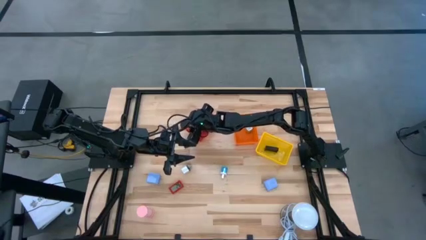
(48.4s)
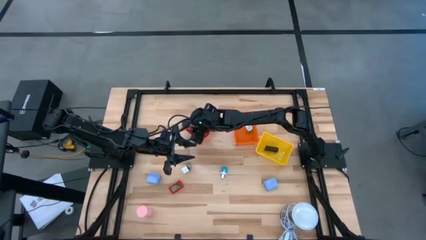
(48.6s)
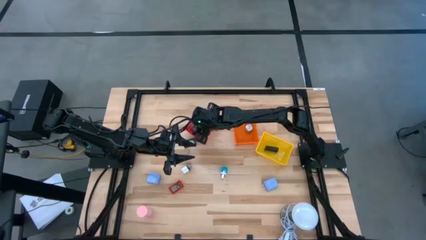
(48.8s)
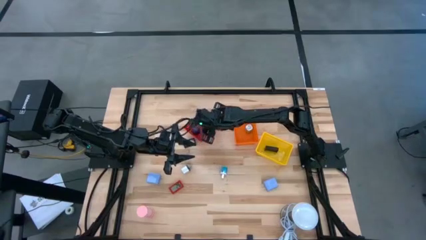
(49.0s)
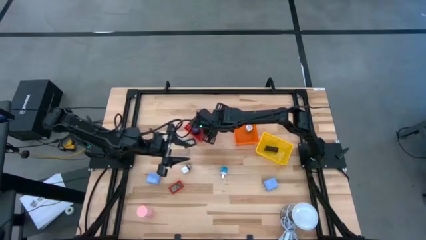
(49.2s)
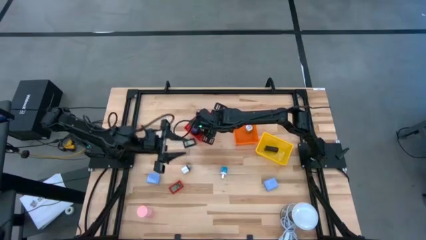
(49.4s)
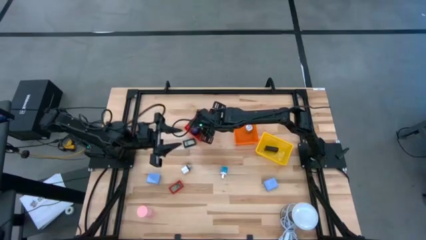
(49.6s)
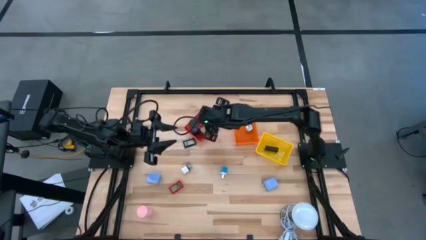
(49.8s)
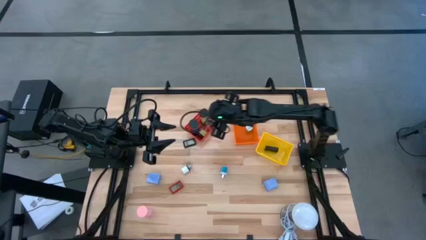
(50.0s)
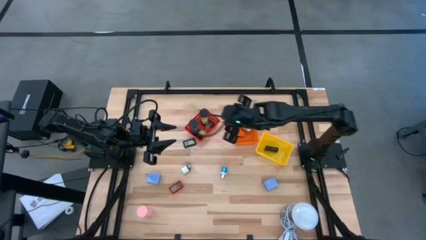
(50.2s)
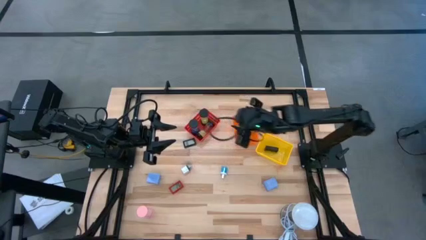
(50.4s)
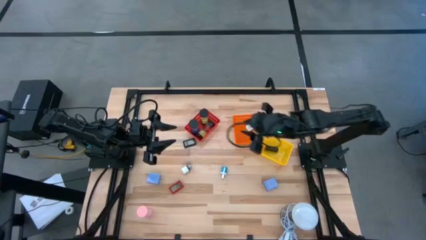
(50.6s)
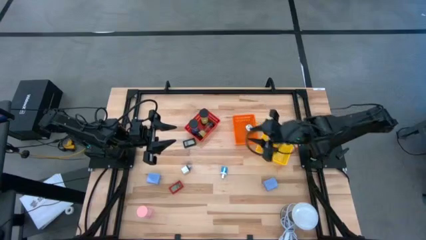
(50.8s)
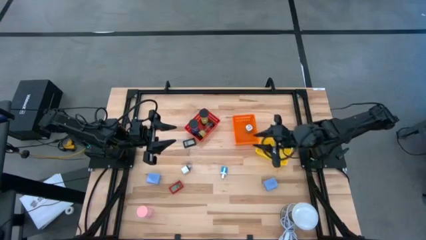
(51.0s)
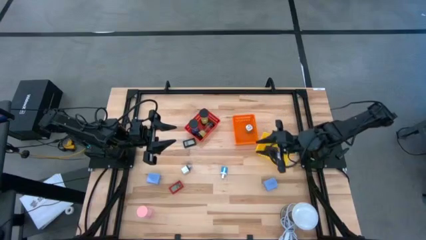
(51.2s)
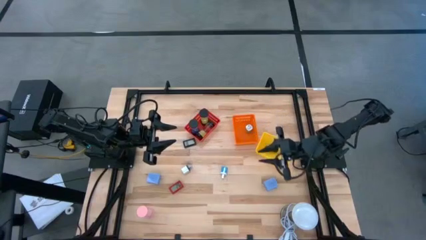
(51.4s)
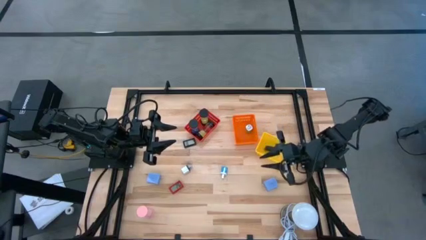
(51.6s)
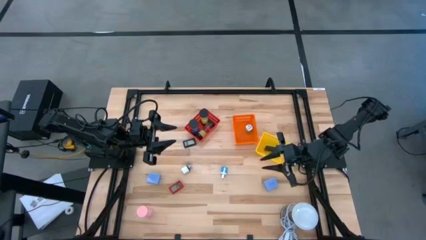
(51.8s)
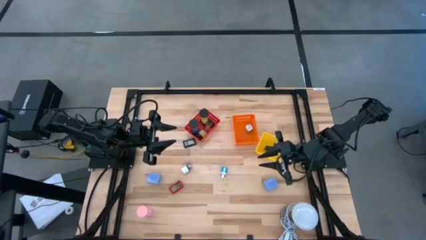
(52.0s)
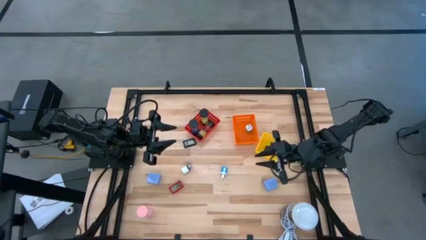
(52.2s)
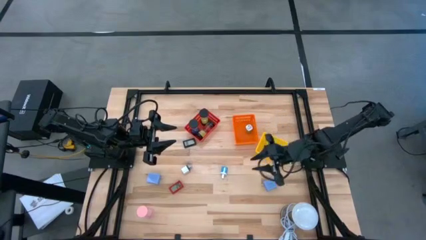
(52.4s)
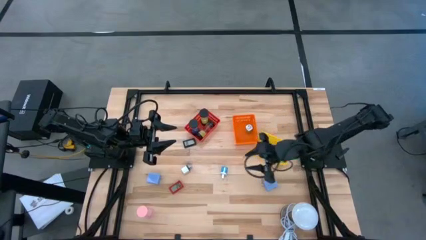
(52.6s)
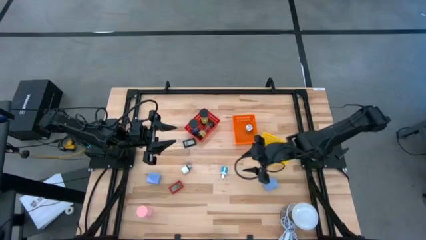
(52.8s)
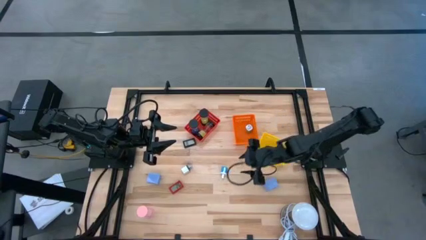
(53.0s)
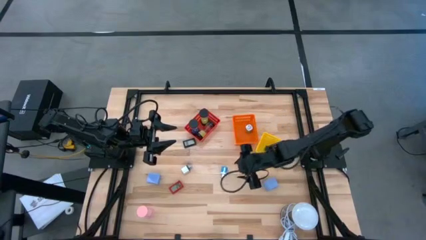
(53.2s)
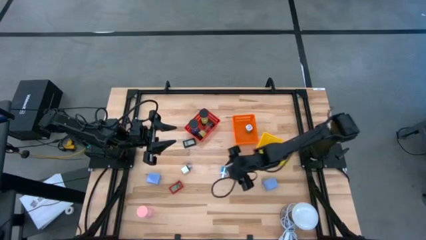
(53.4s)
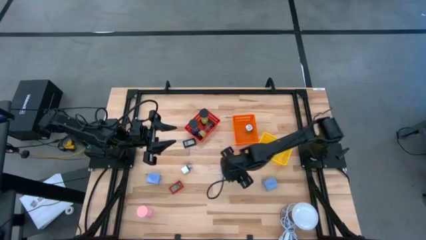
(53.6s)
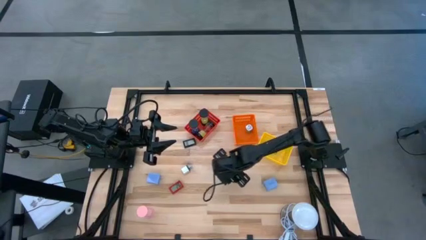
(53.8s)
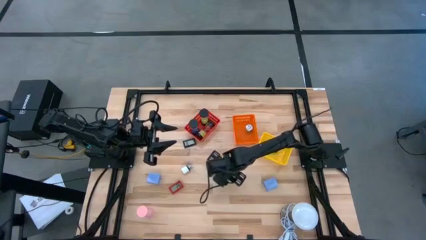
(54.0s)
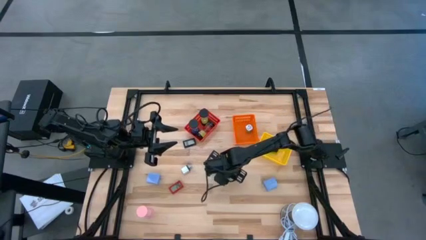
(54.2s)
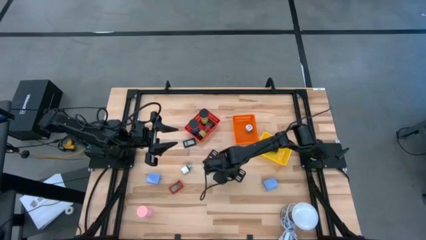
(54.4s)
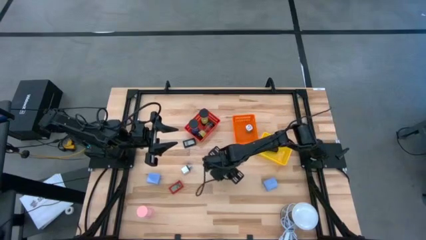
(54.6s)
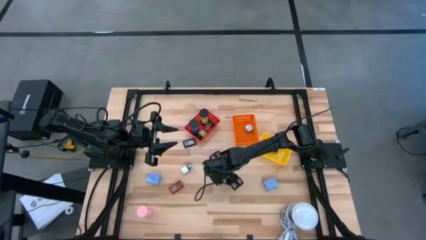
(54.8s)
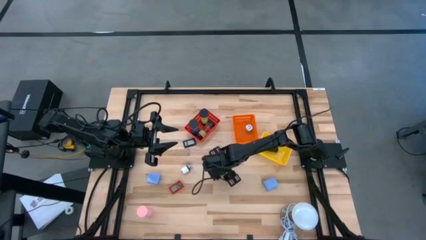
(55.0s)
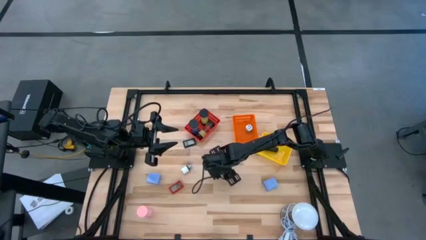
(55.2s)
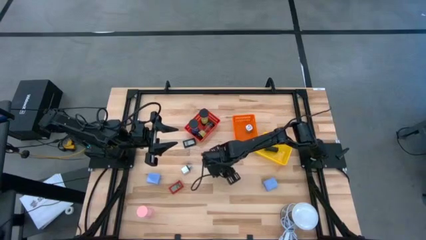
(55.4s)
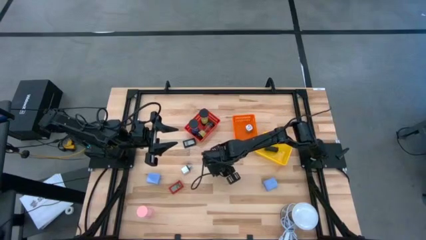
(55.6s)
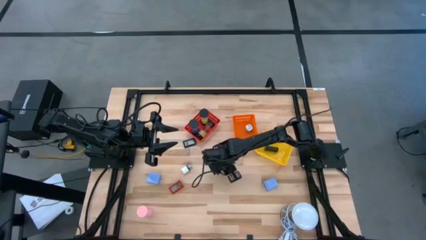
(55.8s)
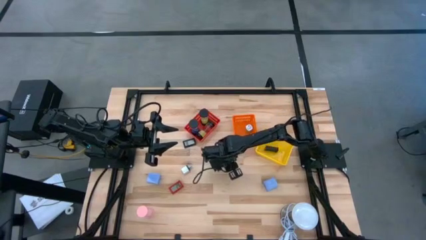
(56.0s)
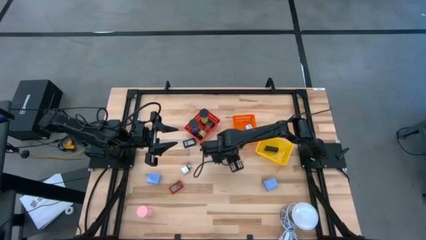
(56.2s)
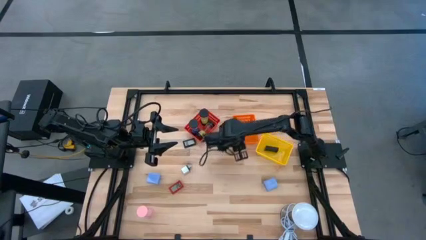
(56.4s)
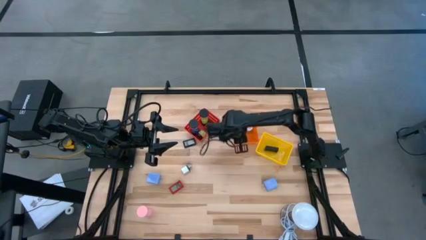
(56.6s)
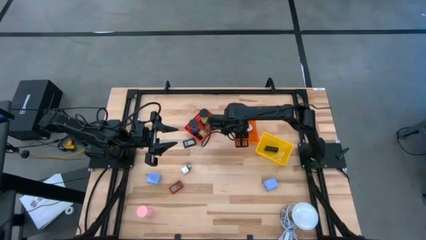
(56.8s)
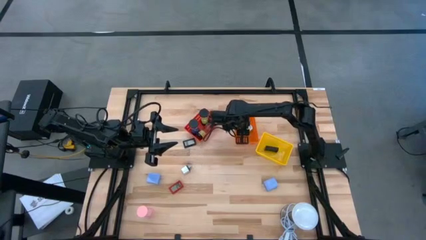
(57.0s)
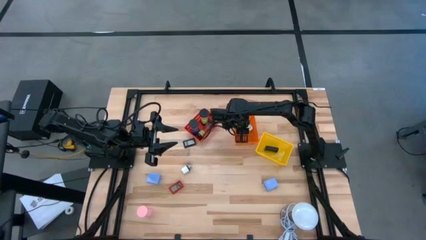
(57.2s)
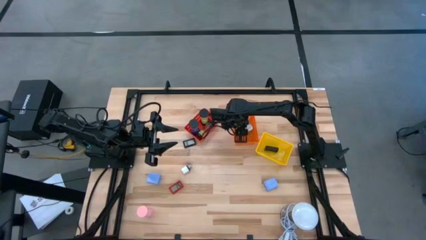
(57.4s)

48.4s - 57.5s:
Task: Pick & Place Office items
Put the blue white charger adapter into the orange bin

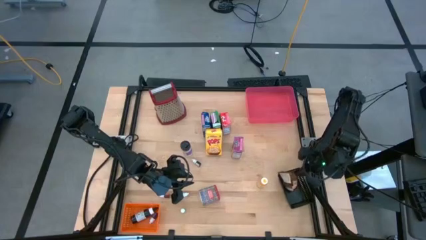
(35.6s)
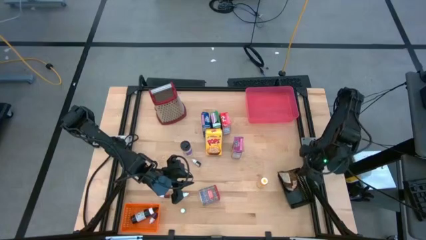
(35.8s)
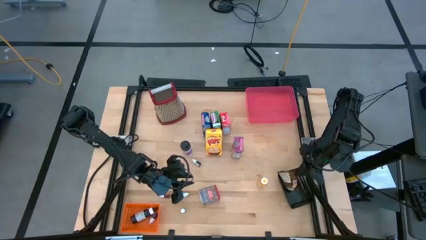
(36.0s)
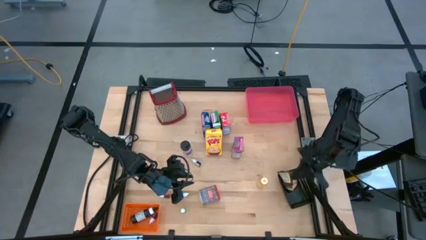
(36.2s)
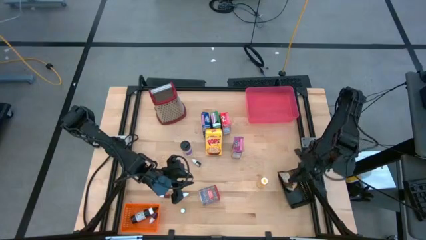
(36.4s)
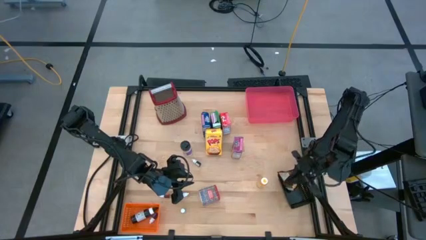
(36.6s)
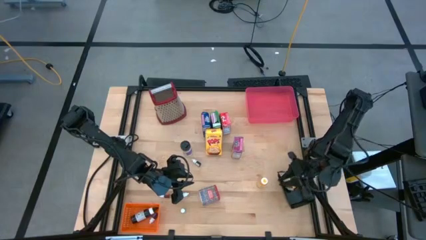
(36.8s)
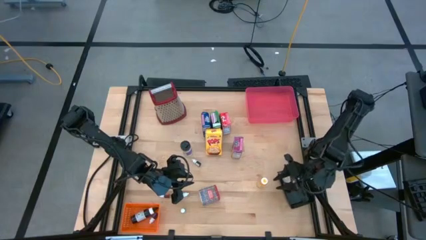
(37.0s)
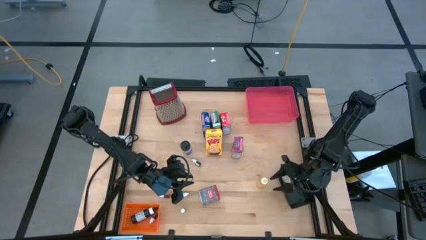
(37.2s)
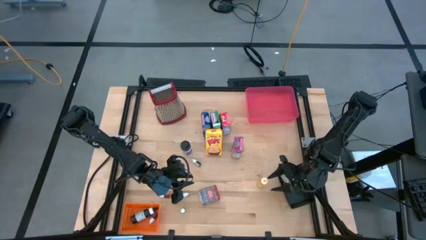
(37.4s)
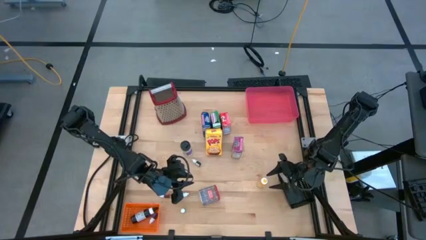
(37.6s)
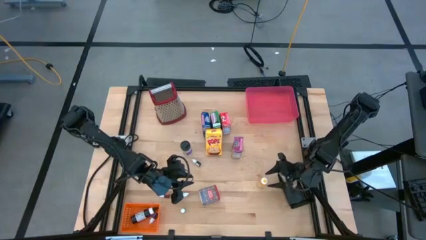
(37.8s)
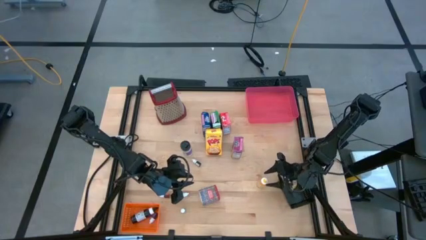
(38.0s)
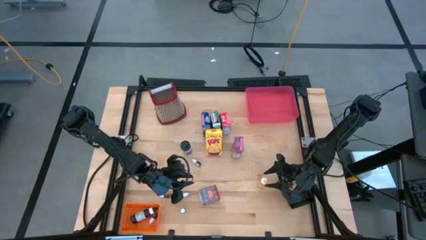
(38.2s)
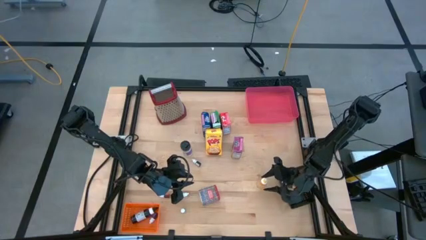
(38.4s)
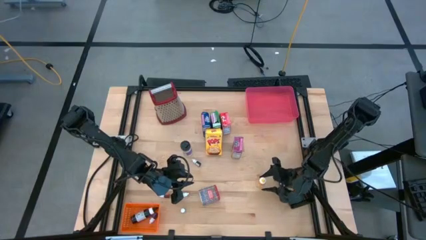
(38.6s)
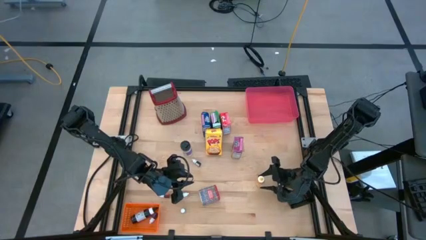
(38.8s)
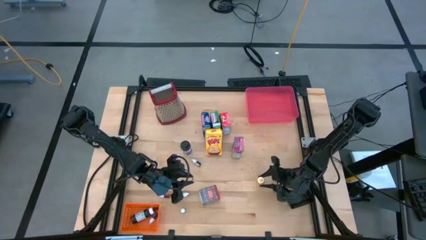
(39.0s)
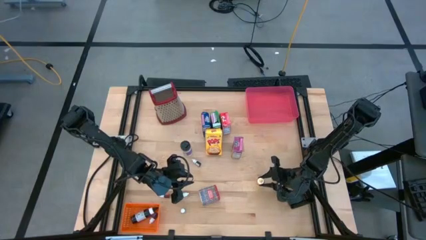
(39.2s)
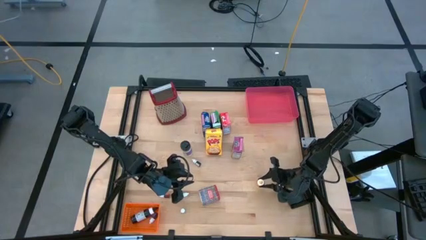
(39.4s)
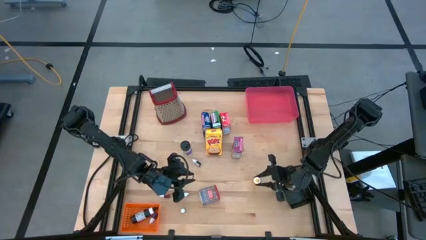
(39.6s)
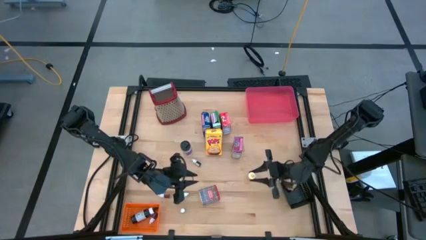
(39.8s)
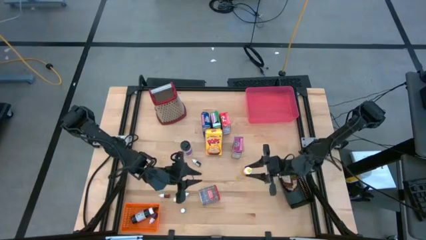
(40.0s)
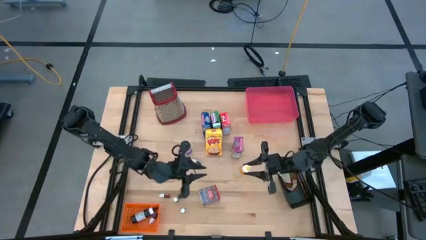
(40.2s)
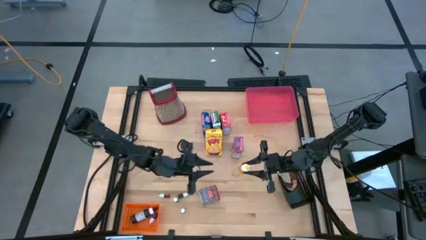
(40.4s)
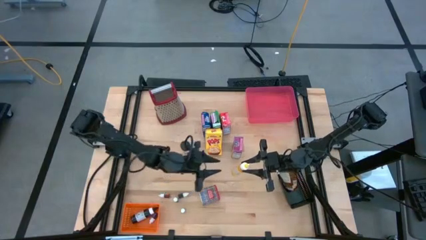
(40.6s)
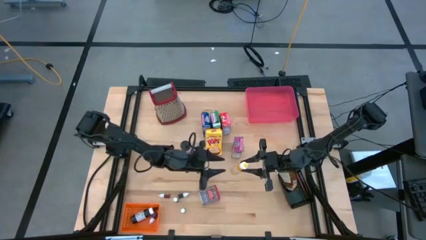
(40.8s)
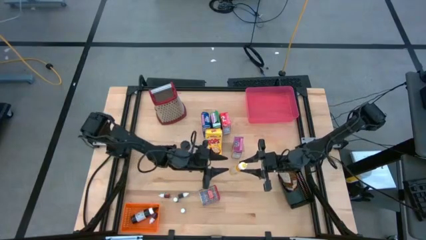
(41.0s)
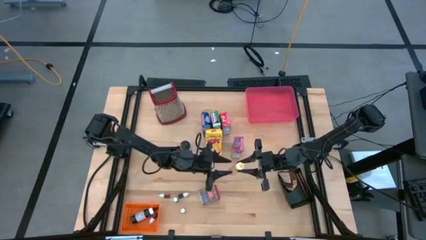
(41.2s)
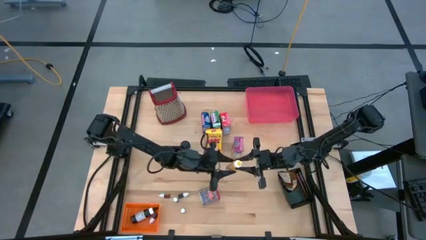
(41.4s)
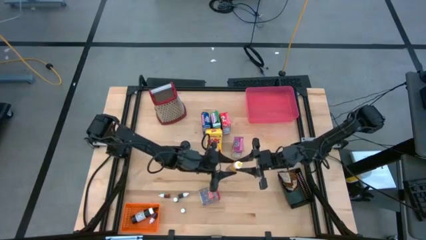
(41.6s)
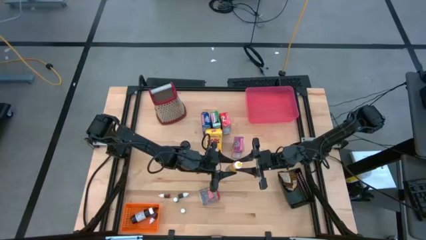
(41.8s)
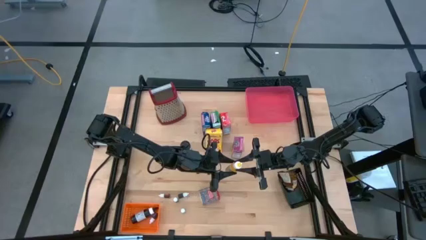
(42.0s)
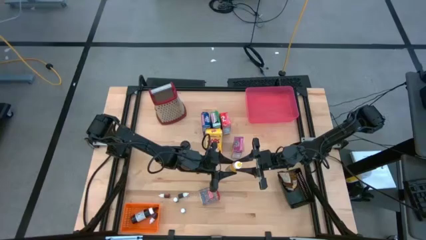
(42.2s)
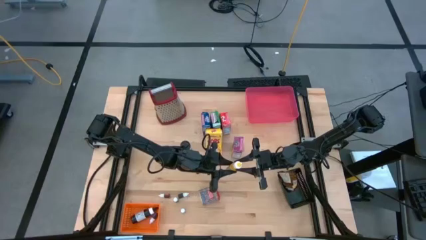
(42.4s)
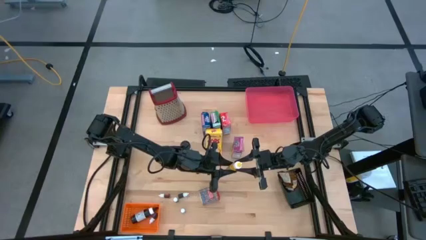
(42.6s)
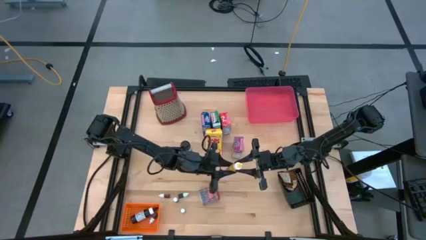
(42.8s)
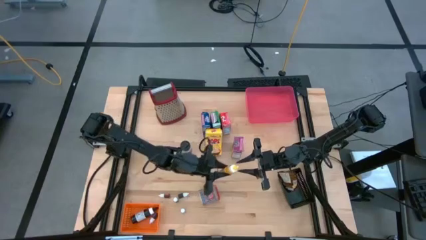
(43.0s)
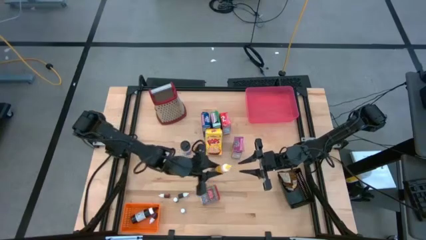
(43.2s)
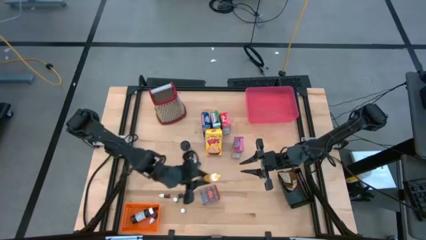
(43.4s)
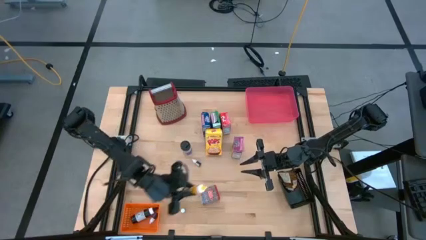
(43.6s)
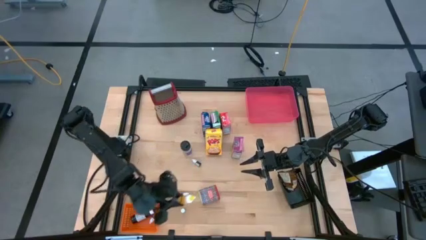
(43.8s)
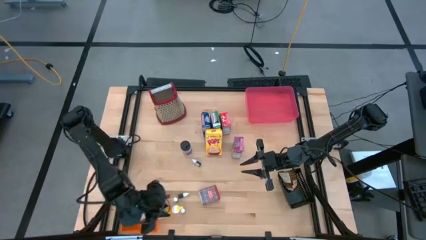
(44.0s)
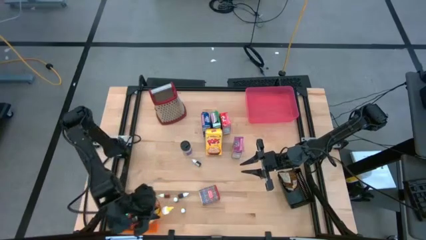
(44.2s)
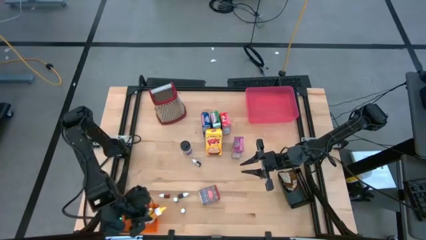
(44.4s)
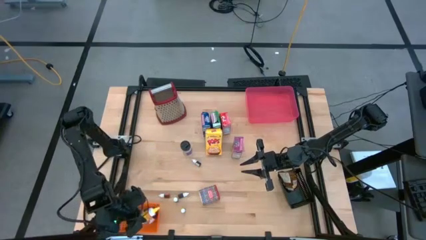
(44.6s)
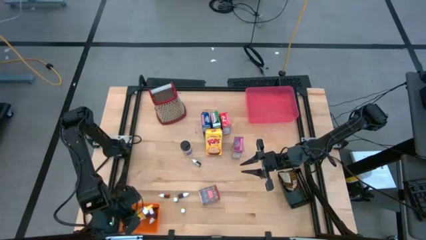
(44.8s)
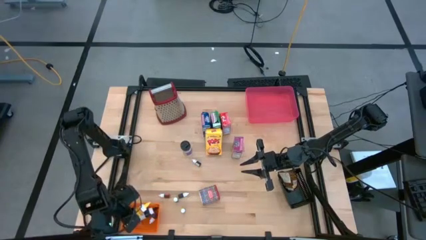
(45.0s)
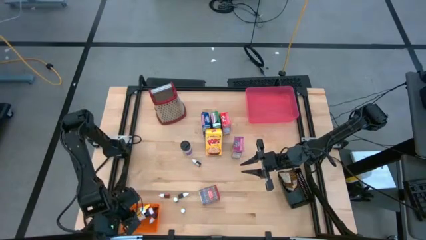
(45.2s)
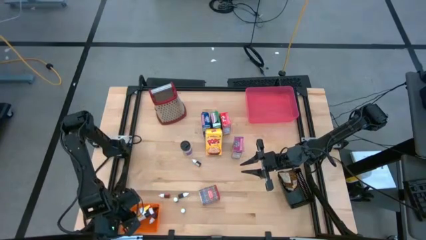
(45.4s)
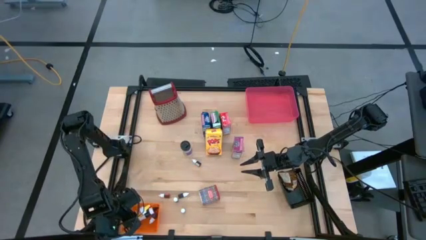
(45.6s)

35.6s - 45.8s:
Task: Pick & Place Kitchen Items
Put the large yellow food coloring bottle into the orange bin
